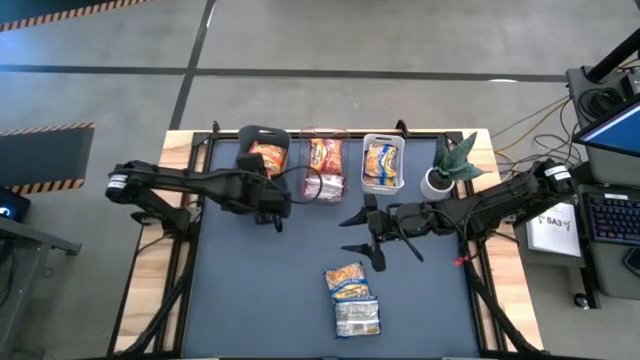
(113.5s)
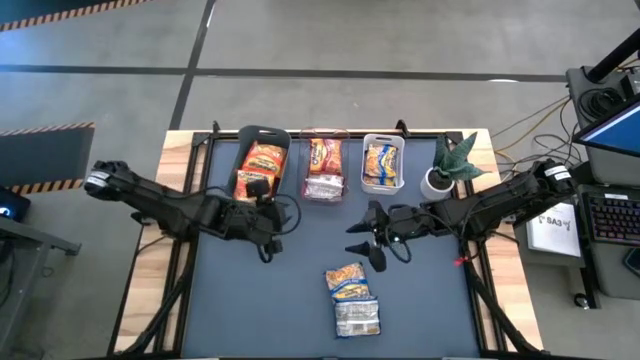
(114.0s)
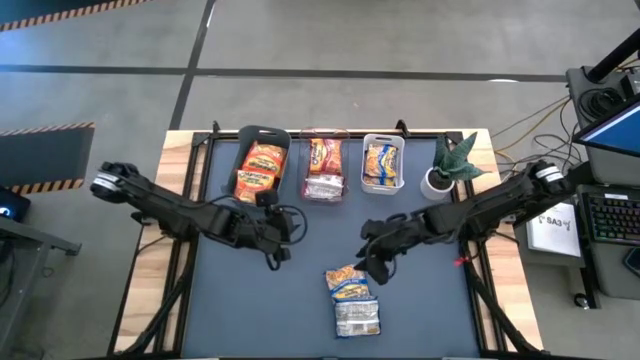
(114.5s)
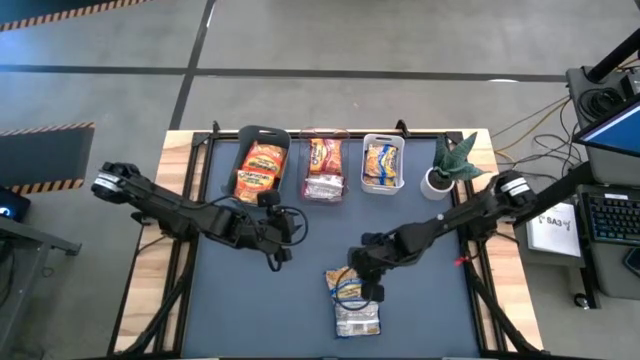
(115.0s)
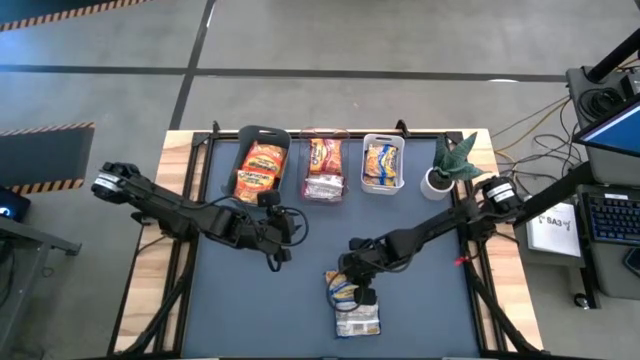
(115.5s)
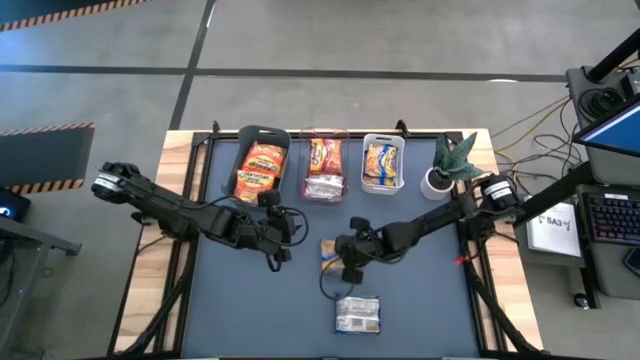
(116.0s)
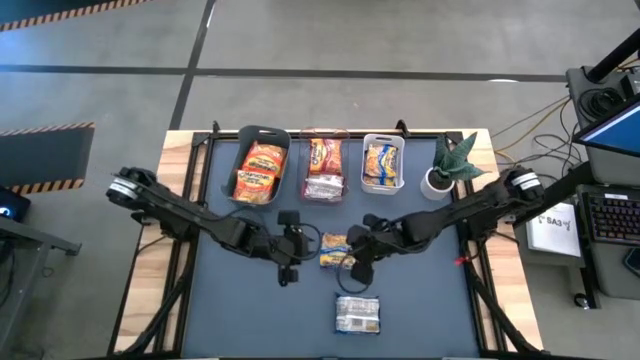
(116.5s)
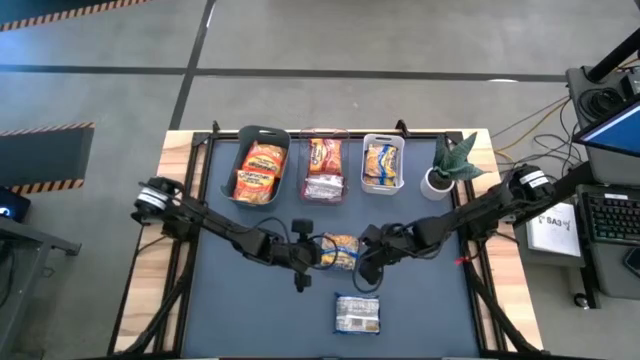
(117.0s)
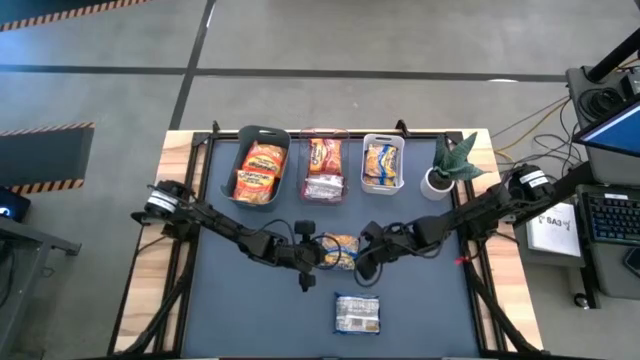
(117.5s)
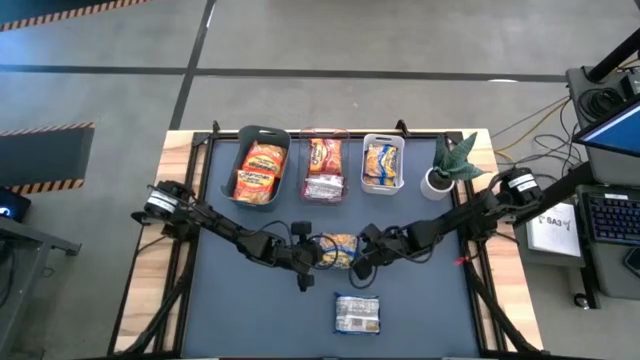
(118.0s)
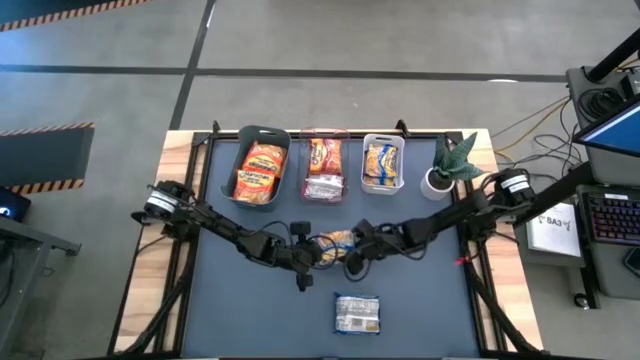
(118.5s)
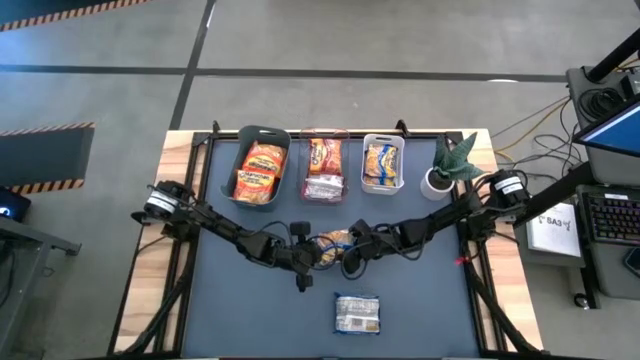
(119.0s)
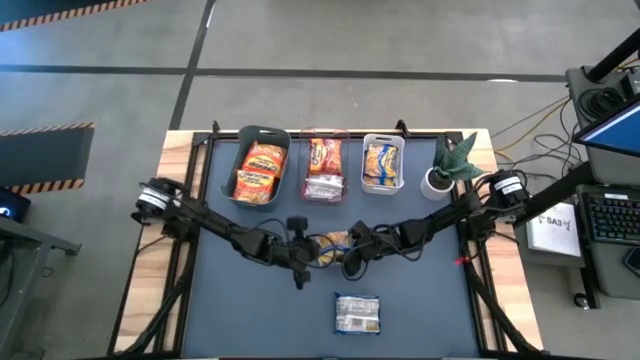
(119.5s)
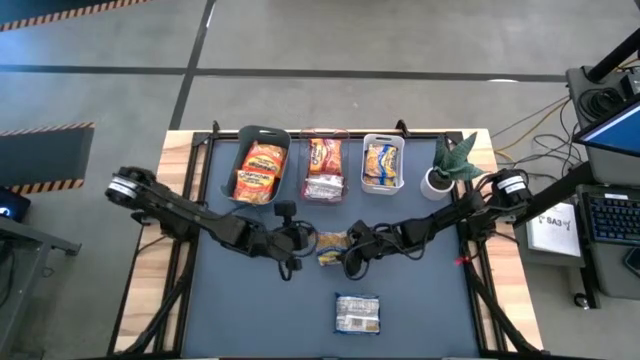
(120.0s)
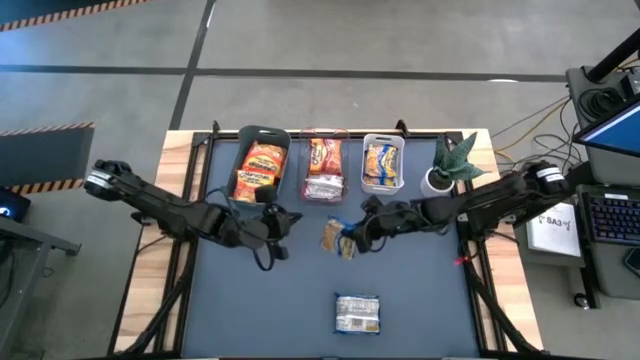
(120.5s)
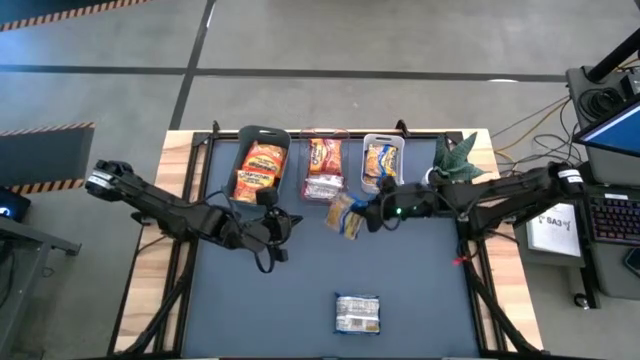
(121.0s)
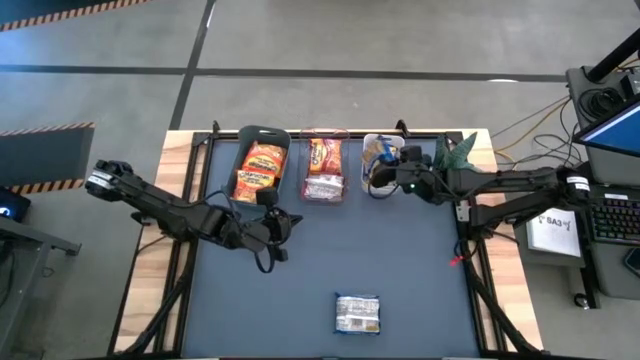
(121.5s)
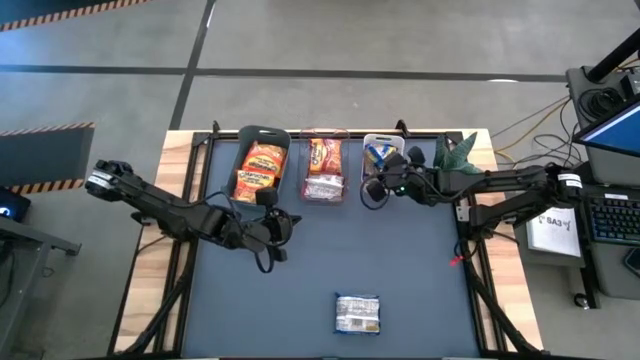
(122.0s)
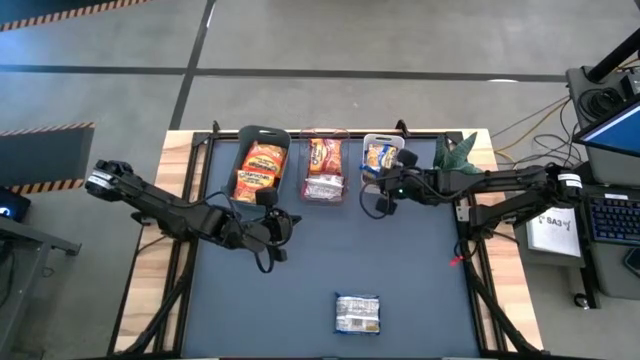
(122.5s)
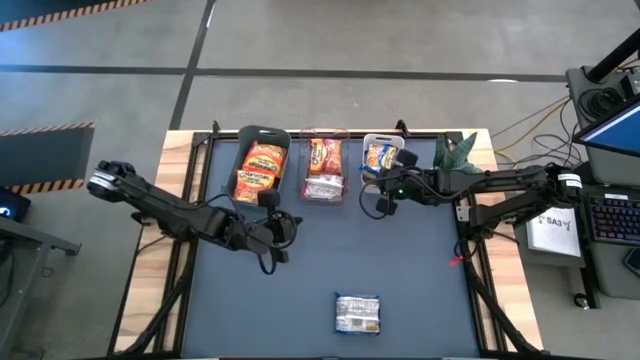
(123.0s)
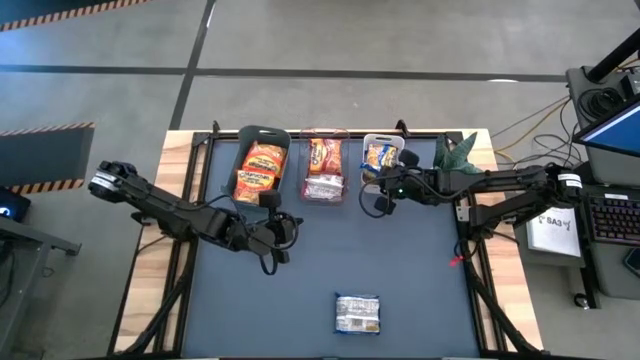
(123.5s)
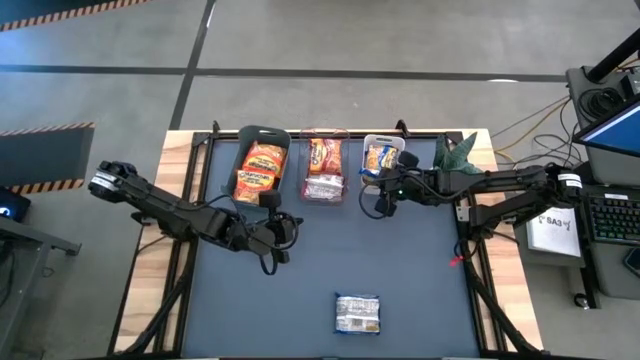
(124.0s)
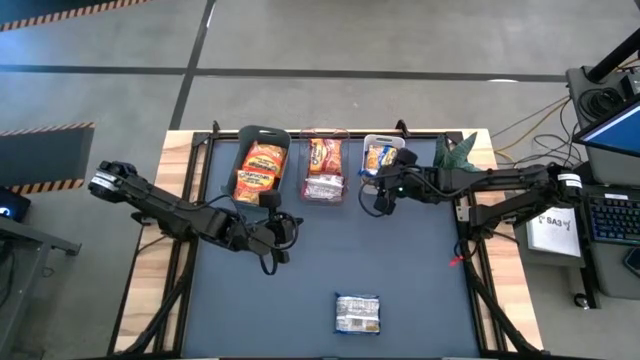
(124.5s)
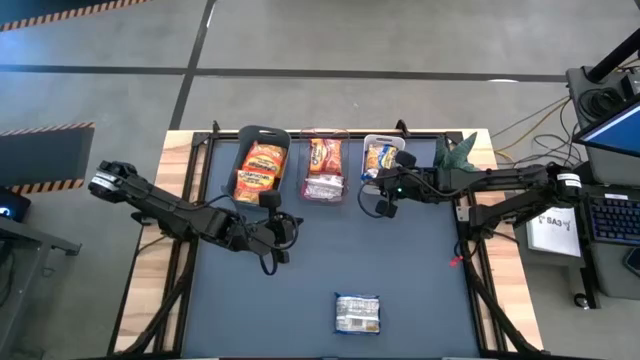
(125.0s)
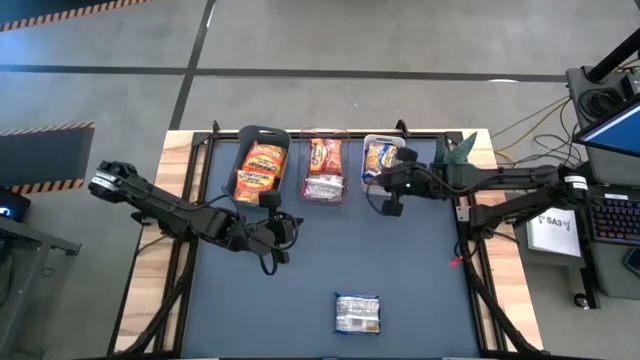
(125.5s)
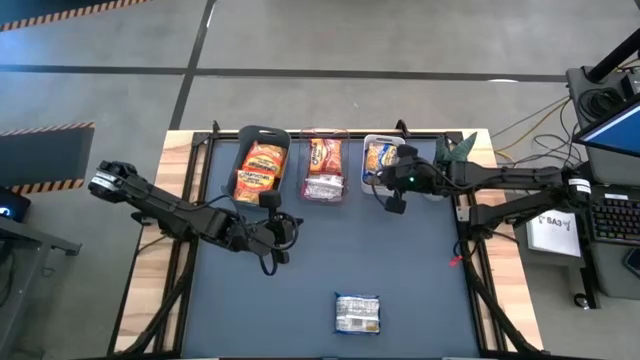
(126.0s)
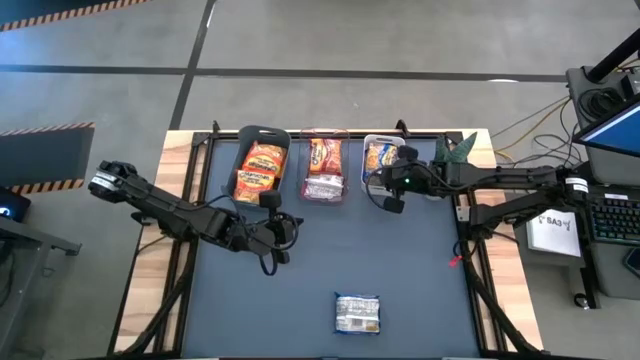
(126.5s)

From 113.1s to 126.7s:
Task: Sort Maruchan noodles
Put the blue noodle pack into the white bin
